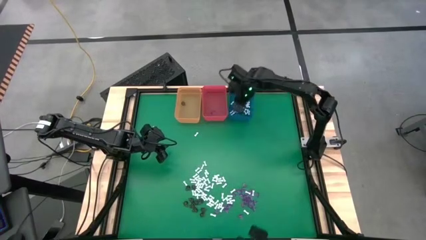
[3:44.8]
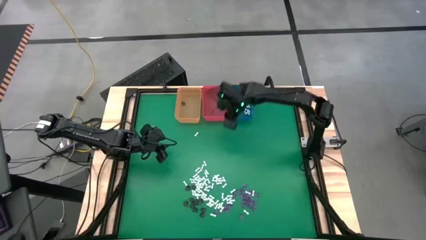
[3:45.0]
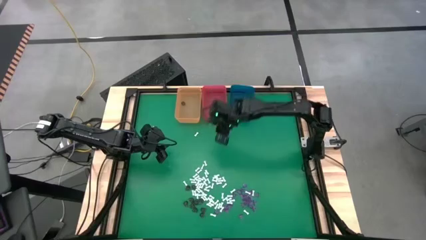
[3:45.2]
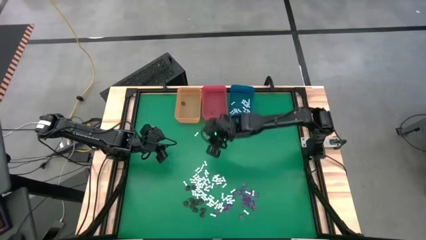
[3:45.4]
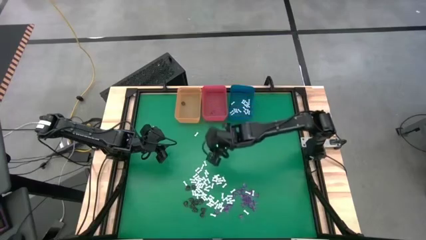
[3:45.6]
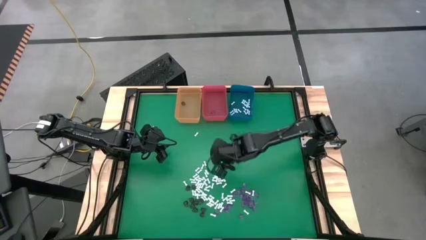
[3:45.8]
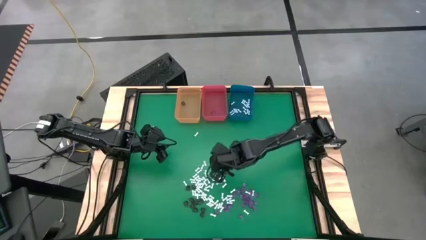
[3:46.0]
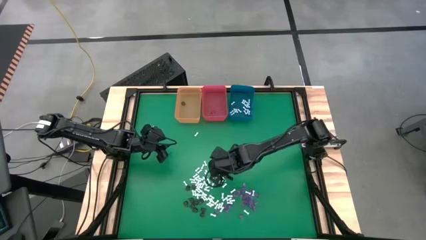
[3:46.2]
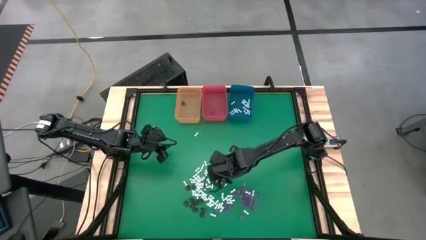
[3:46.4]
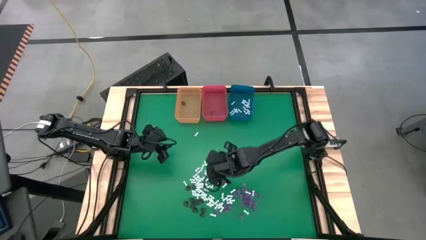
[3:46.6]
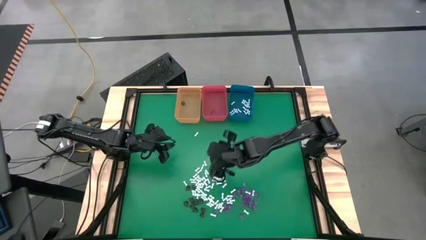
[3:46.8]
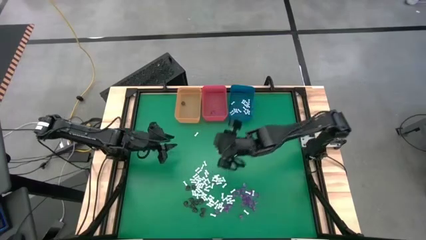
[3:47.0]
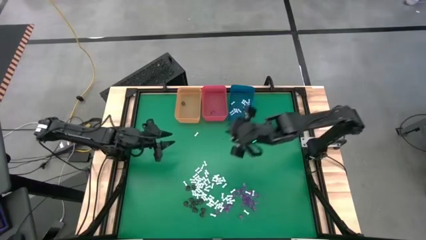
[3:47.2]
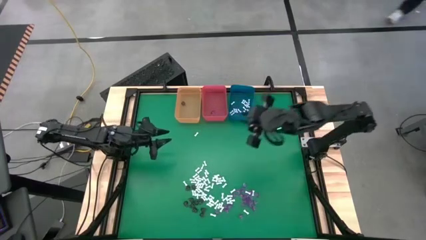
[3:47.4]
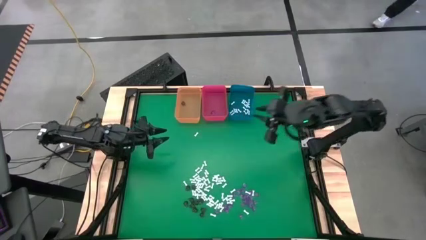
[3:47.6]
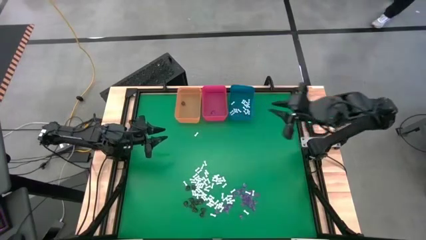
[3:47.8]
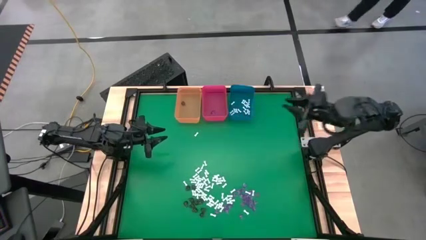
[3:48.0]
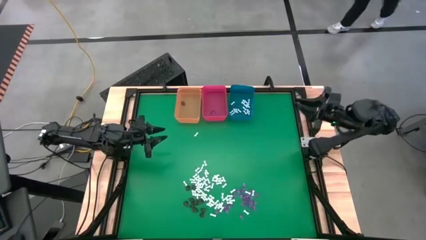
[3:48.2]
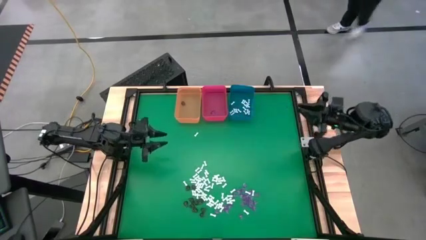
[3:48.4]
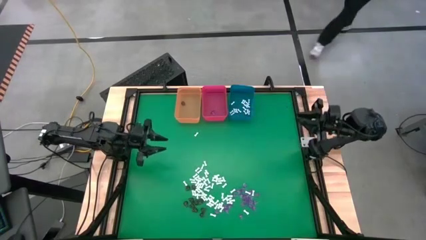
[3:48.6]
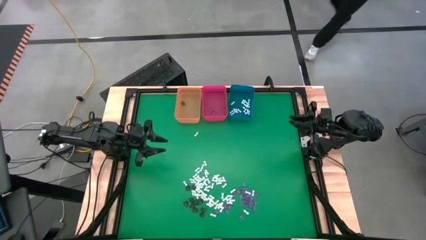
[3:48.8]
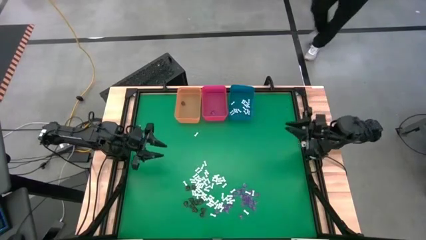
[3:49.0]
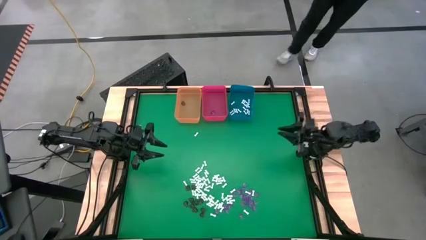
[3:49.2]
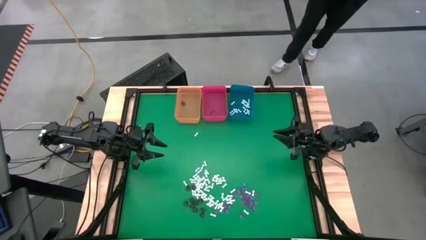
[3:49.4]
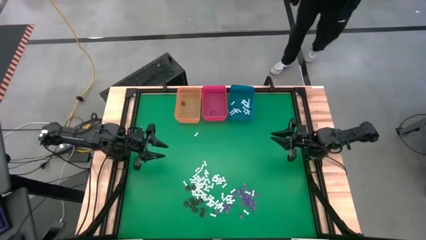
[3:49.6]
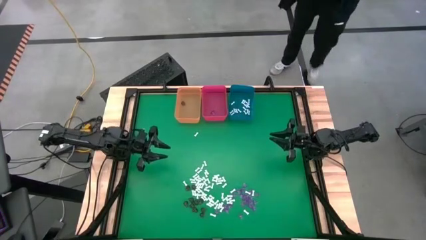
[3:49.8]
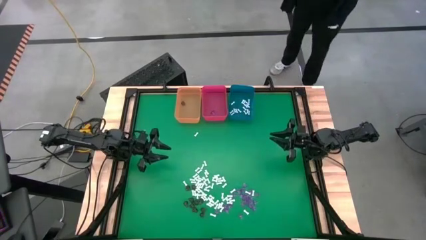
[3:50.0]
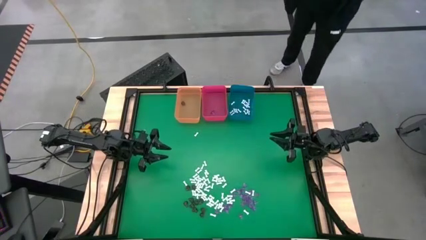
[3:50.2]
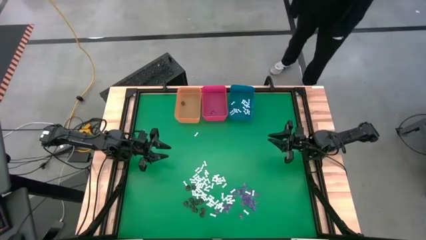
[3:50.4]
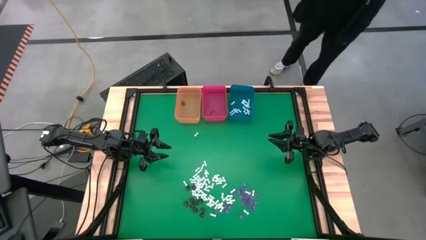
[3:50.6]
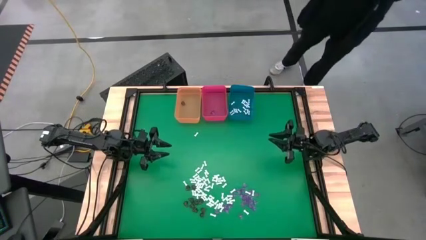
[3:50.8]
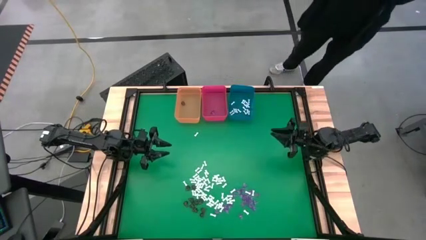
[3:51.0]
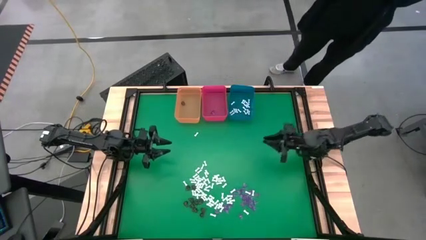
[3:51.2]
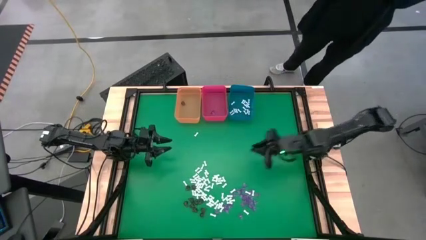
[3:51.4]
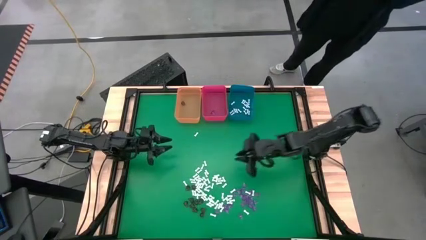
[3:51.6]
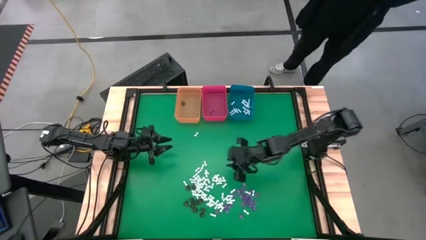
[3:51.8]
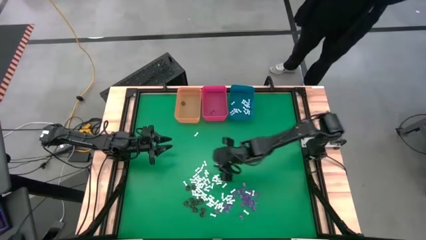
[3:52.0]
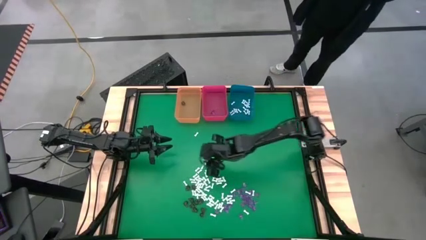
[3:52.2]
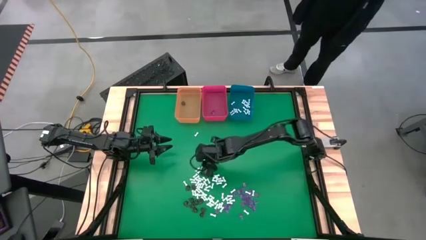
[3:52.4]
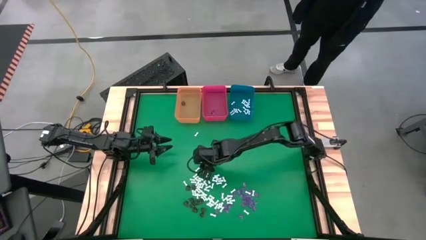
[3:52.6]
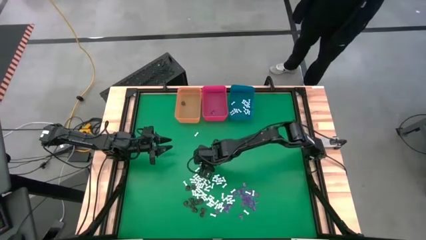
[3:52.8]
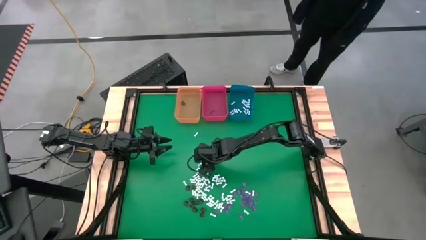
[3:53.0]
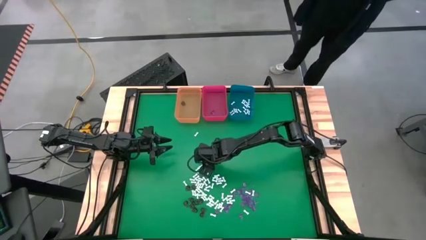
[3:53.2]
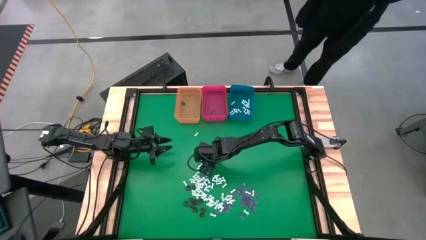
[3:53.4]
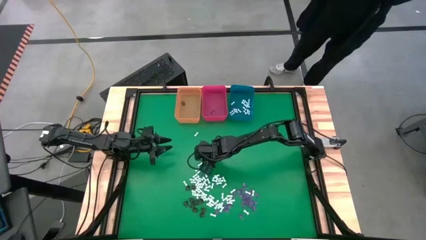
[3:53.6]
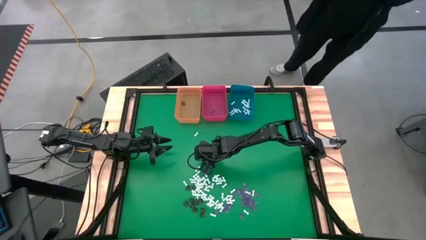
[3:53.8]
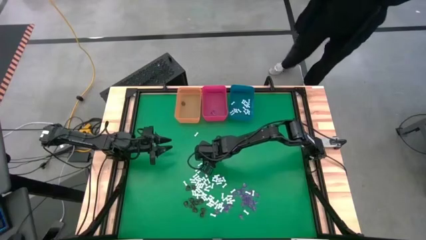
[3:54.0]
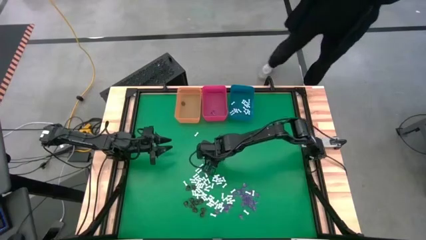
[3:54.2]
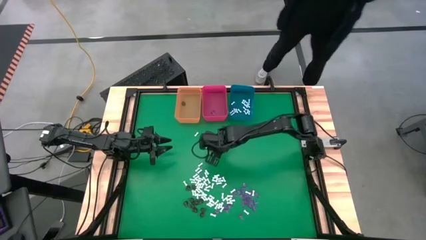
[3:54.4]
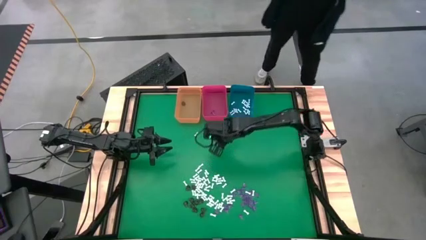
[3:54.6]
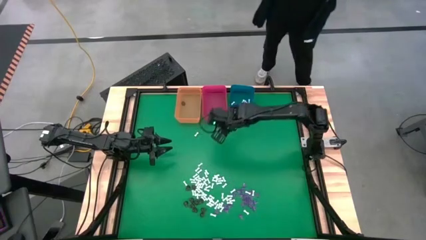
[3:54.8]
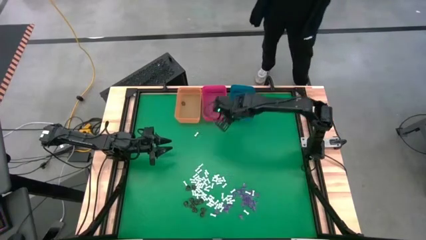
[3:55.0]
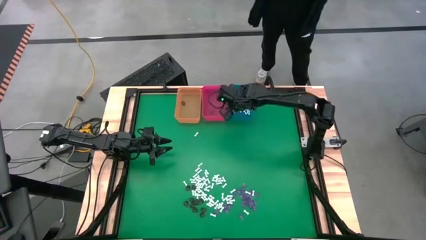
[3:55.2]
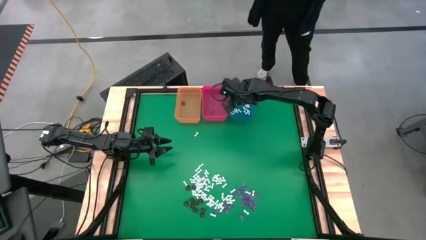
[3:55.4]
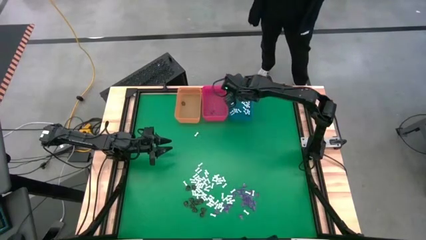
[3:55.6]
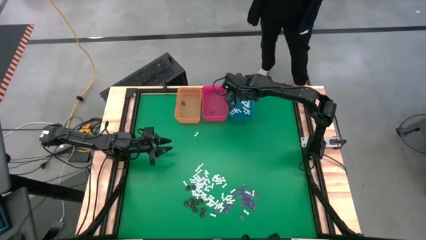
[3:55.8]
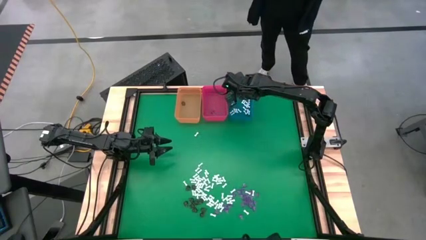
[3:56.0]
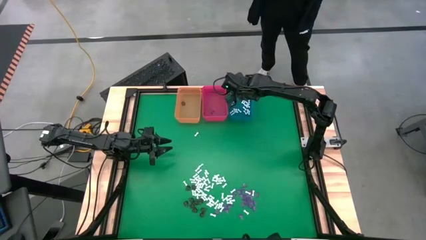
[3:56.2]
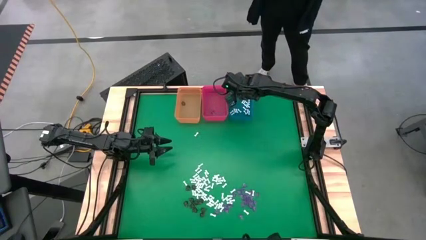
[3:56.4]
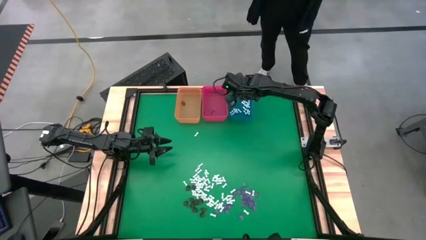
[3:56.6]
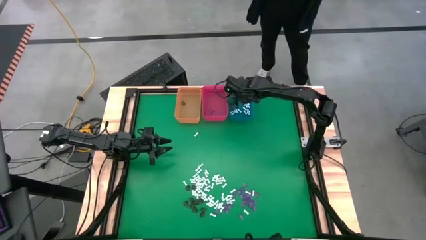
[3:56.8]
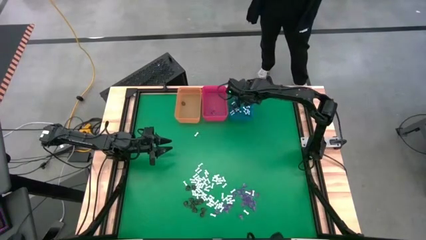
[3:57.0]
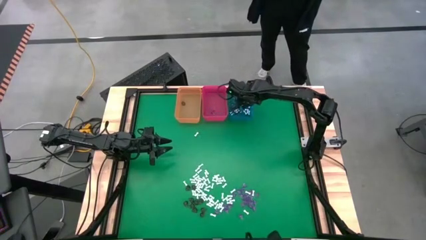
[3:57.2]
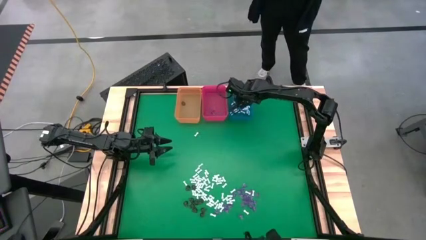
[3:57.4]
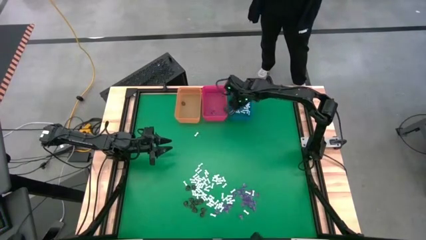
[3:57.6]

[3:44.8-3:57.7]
Task: Sort Halloween decoration
Put the white bone toy into the blue bin

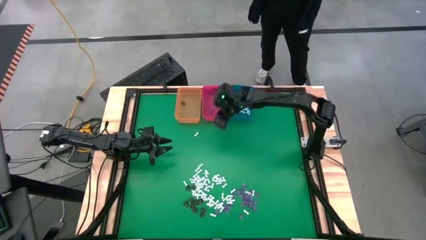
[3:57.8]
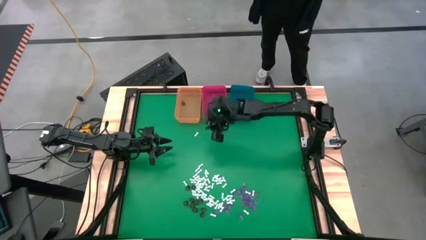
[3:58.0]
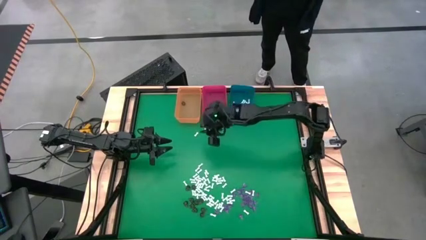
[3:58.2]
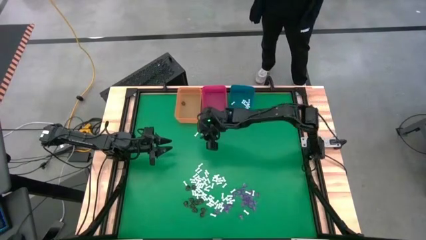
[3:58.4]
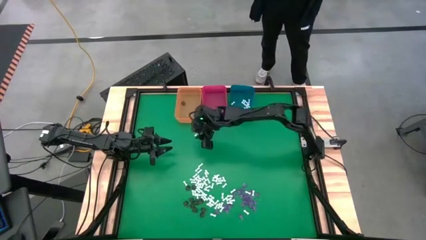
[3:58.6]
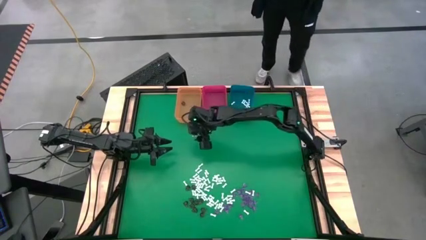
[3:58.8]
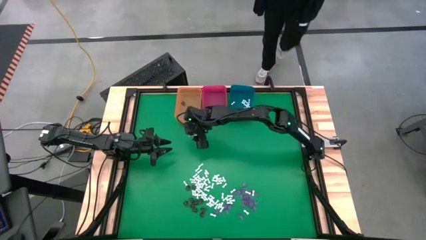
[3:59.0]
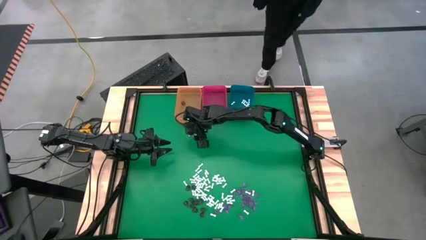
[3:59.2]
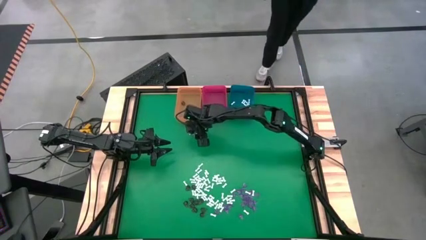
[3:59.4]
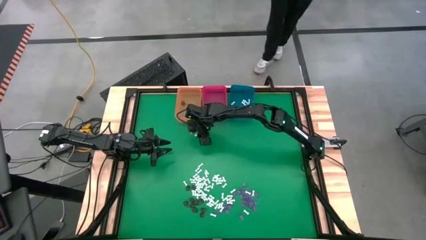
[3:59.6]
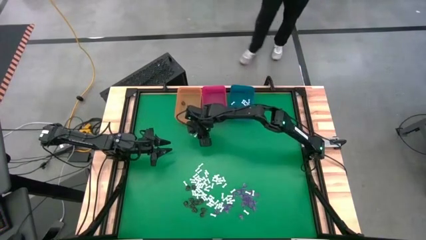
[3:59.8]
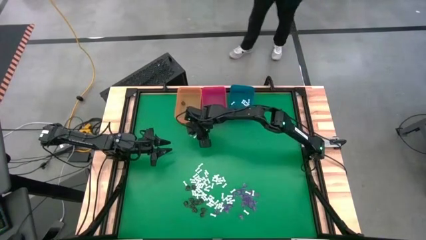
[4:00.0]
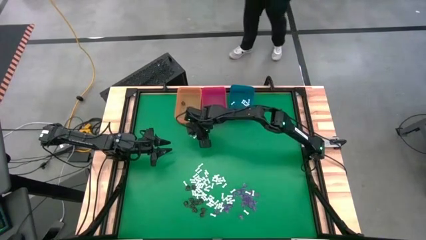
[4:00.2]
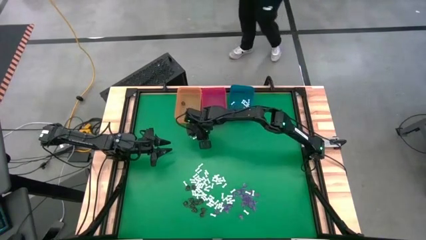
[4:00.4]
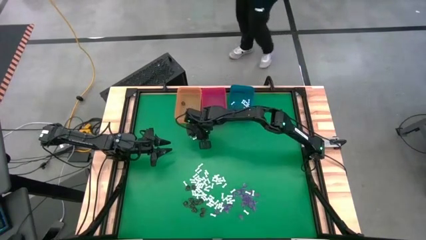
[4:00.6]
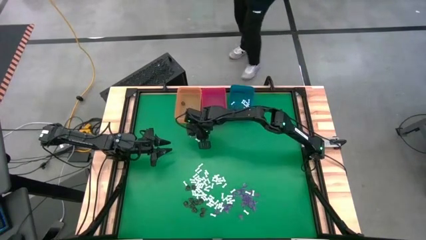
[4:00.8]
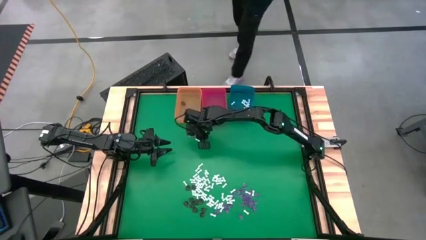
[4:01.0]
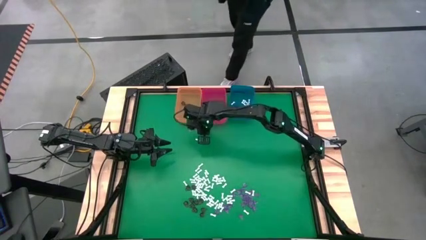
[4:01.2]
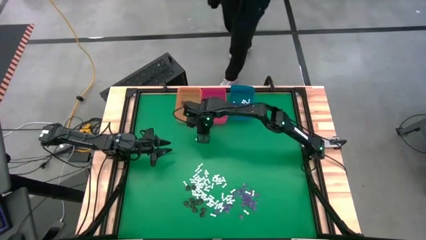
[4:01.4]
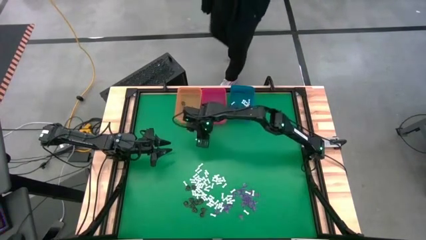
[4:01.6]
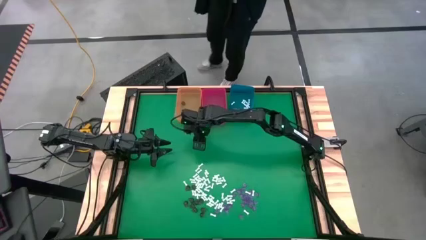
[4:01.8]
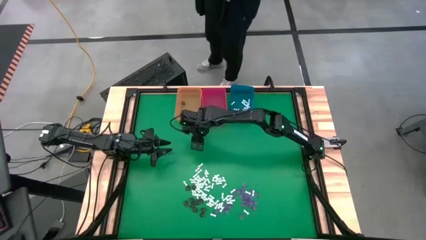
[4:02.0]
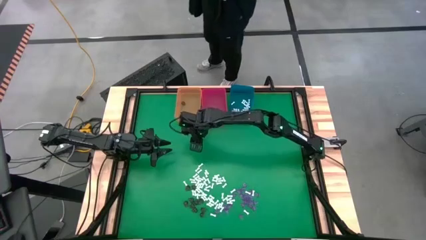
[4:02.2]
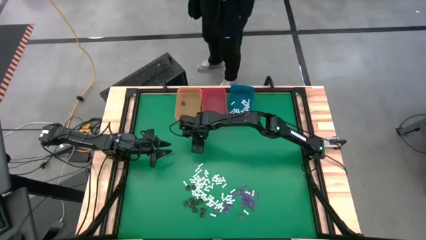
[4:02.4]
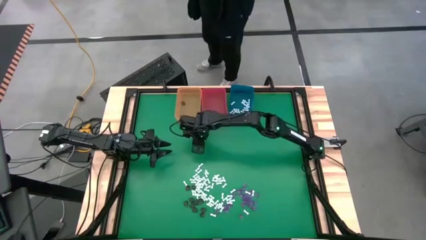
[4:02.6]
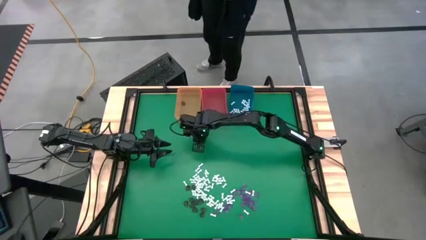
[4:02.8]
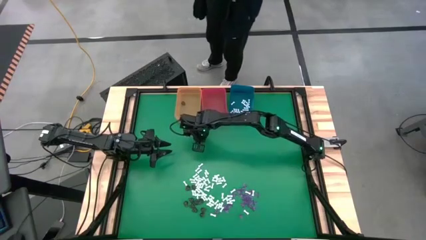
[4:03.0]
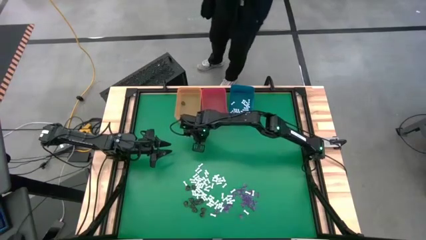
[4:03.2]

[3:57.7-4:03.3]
Put the white bone toy into the blue bin
